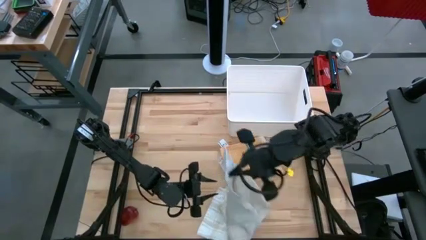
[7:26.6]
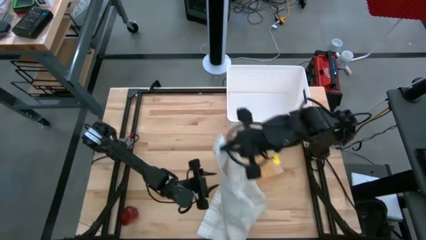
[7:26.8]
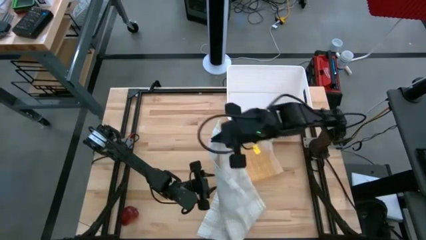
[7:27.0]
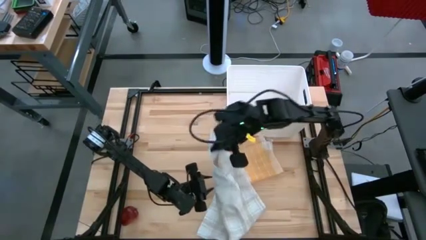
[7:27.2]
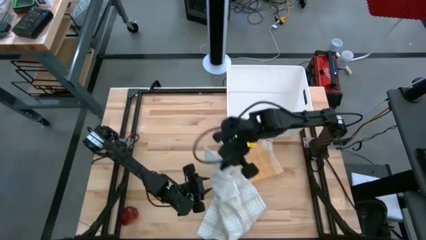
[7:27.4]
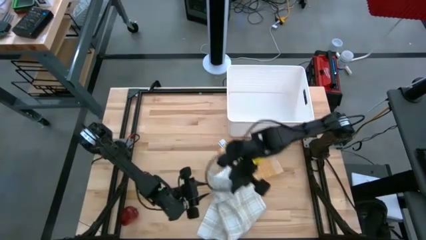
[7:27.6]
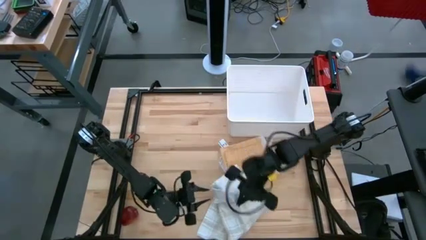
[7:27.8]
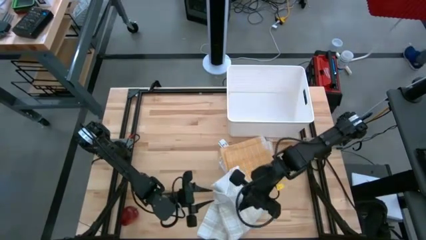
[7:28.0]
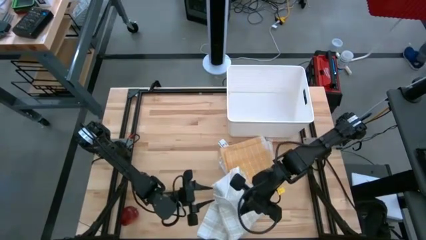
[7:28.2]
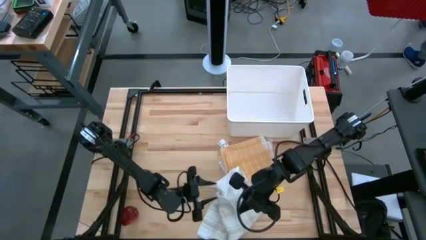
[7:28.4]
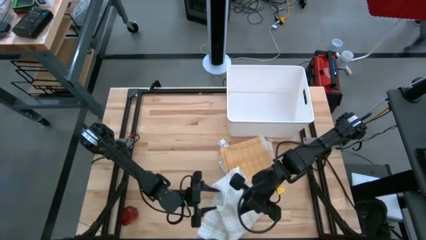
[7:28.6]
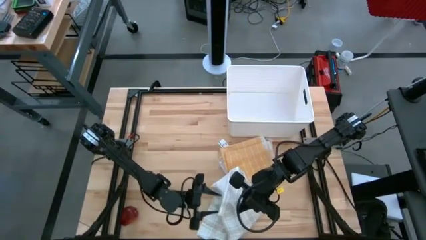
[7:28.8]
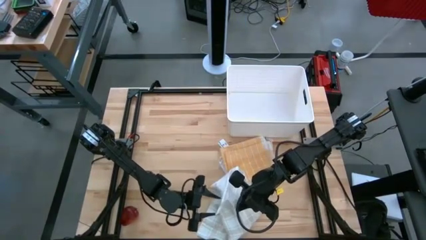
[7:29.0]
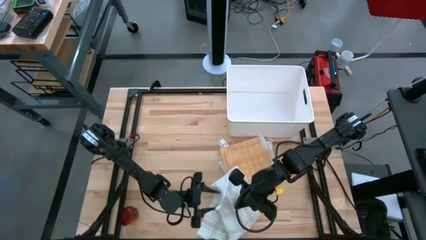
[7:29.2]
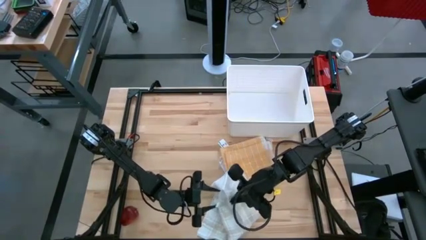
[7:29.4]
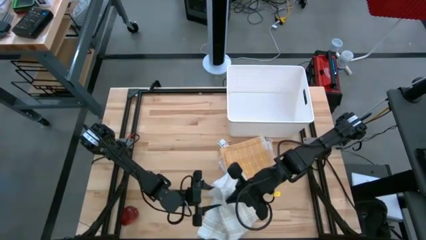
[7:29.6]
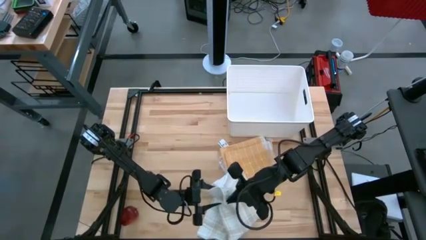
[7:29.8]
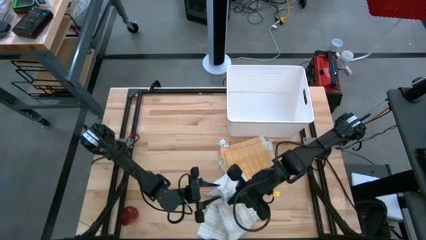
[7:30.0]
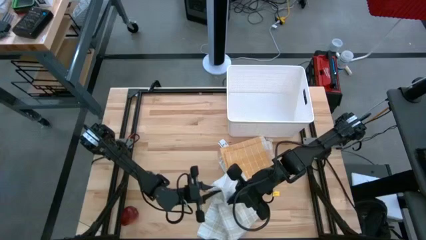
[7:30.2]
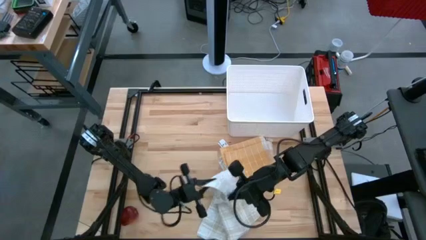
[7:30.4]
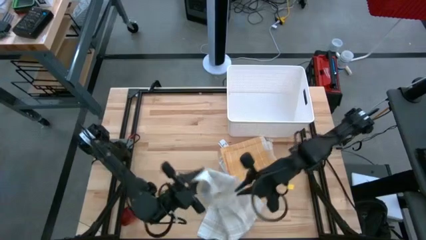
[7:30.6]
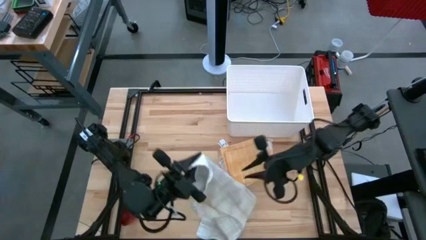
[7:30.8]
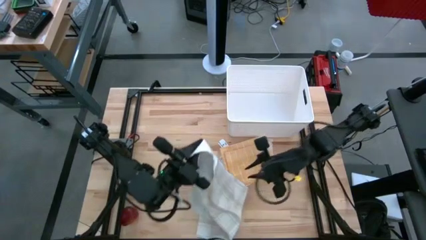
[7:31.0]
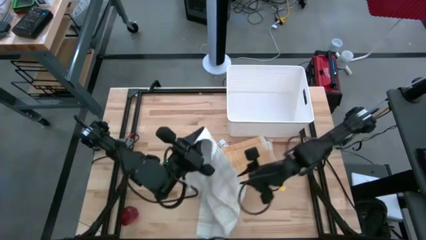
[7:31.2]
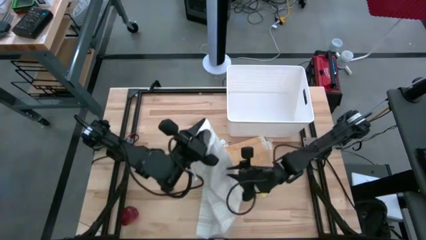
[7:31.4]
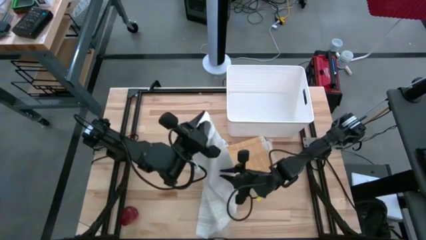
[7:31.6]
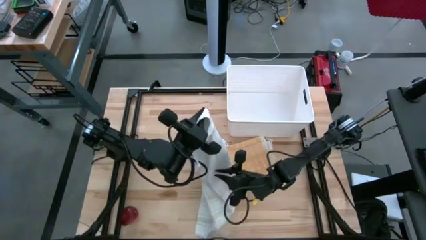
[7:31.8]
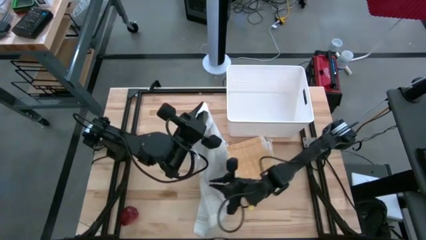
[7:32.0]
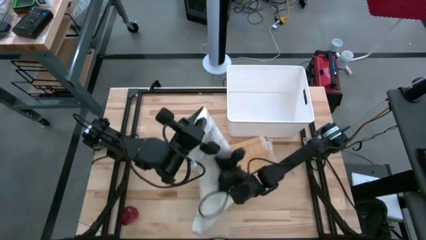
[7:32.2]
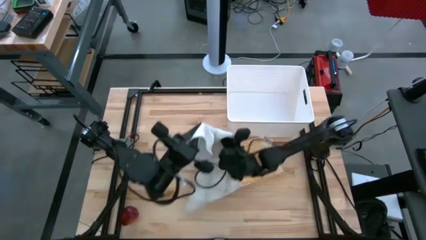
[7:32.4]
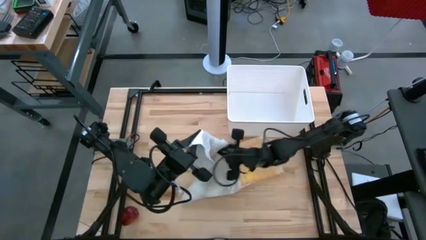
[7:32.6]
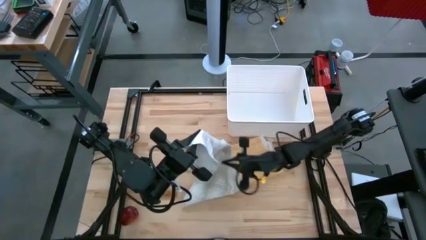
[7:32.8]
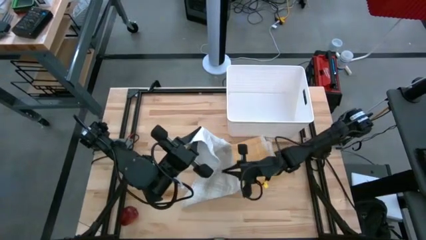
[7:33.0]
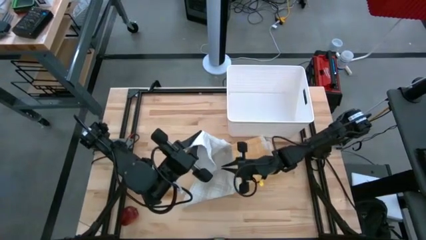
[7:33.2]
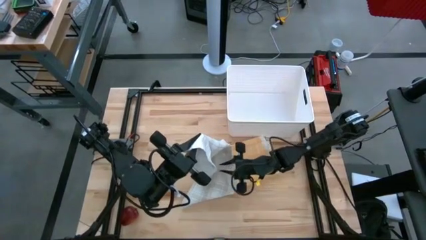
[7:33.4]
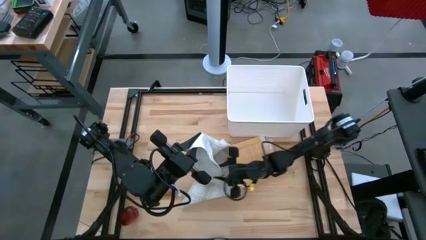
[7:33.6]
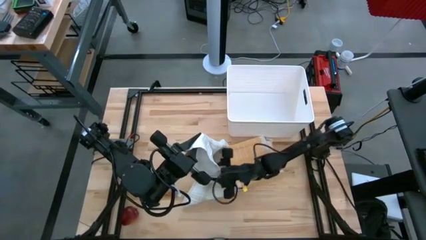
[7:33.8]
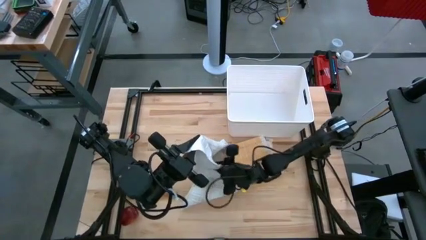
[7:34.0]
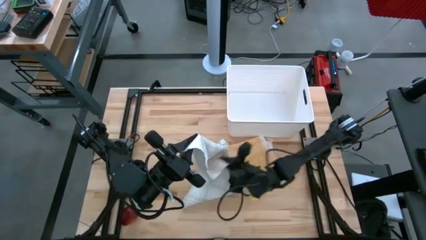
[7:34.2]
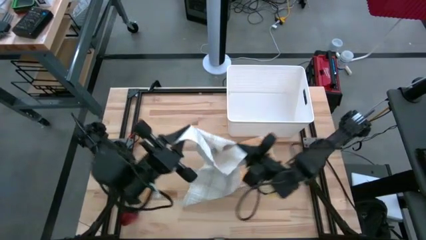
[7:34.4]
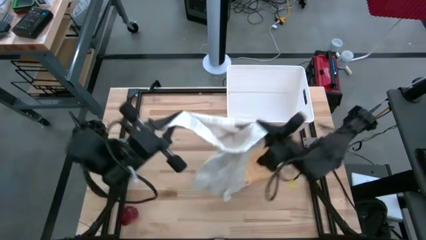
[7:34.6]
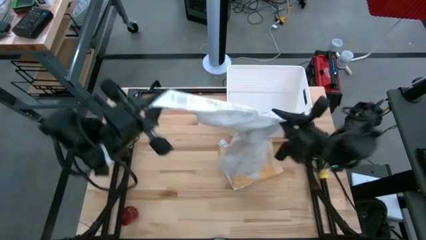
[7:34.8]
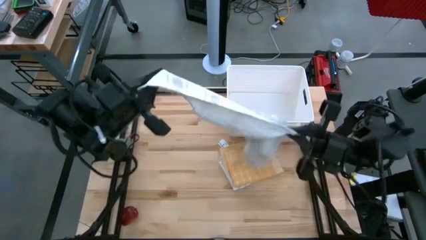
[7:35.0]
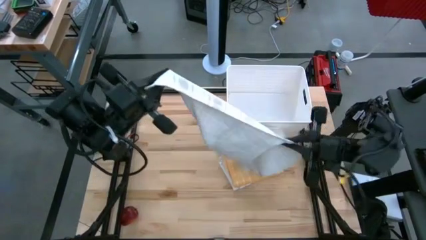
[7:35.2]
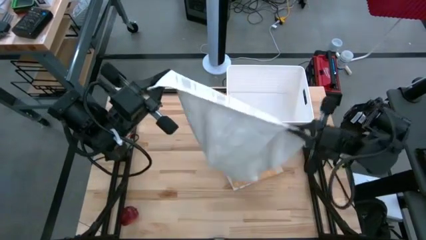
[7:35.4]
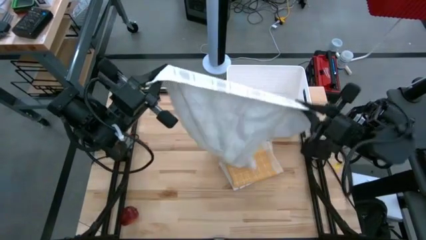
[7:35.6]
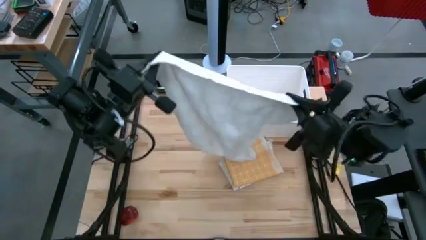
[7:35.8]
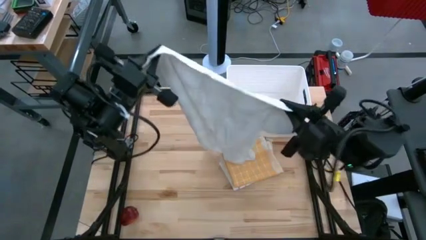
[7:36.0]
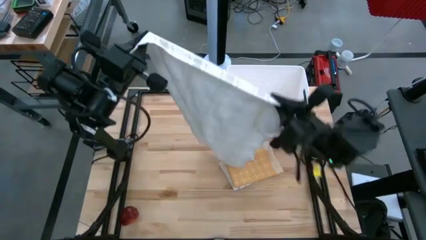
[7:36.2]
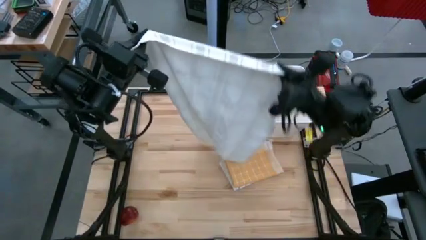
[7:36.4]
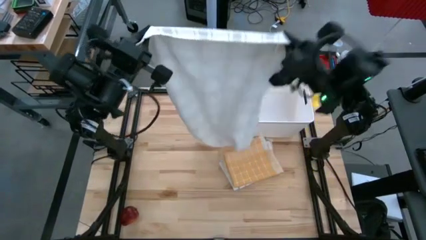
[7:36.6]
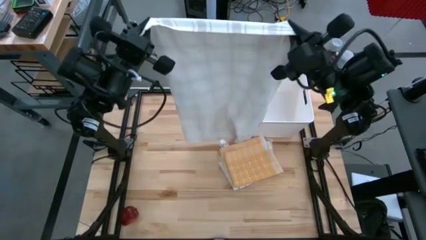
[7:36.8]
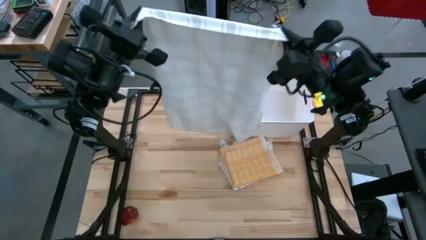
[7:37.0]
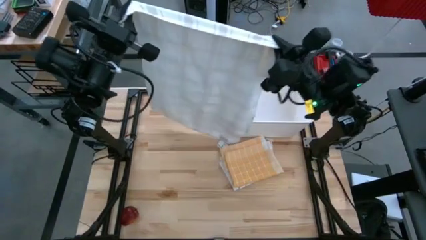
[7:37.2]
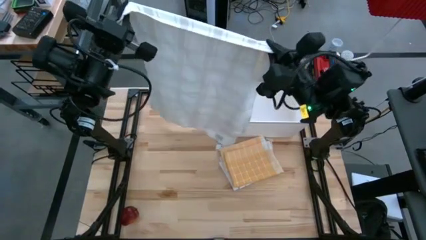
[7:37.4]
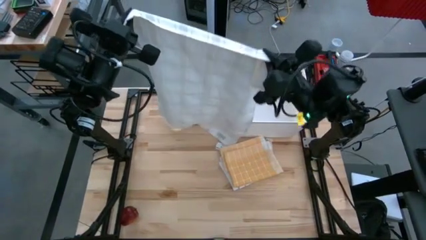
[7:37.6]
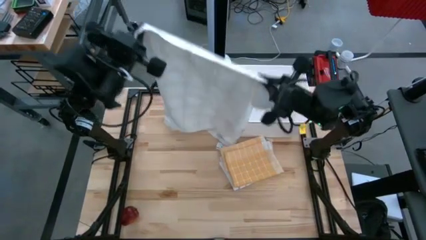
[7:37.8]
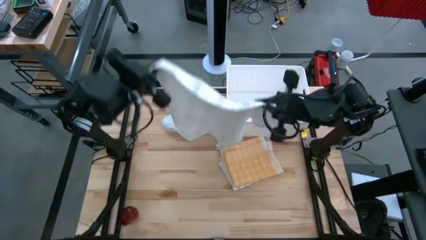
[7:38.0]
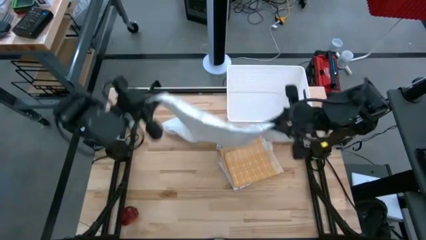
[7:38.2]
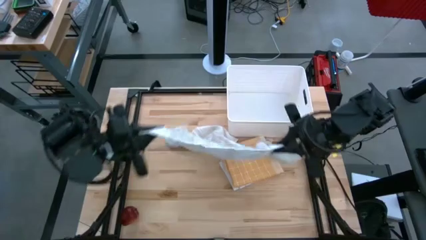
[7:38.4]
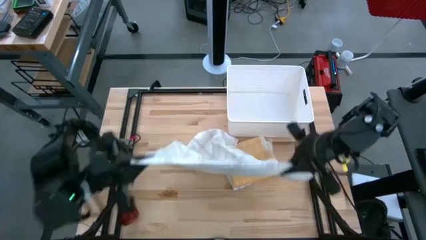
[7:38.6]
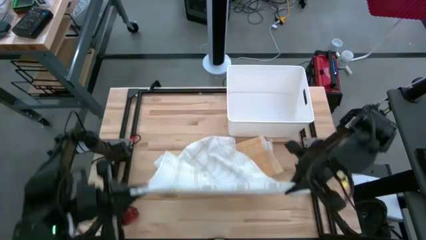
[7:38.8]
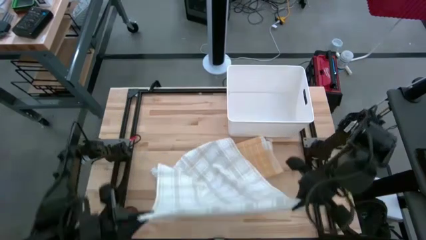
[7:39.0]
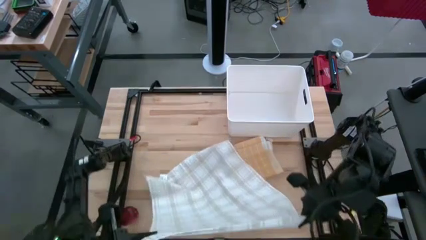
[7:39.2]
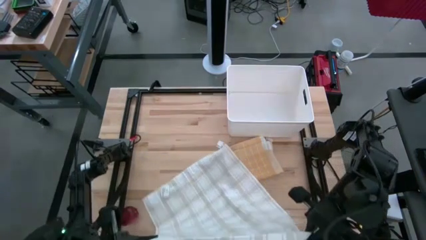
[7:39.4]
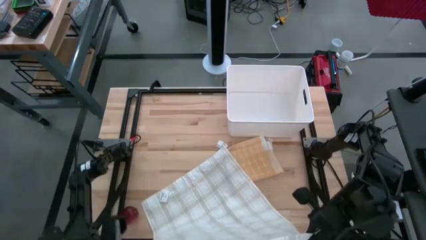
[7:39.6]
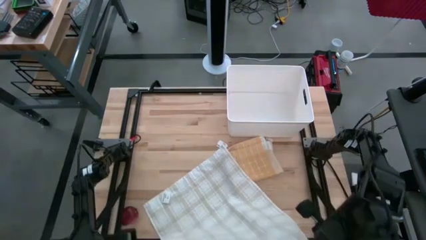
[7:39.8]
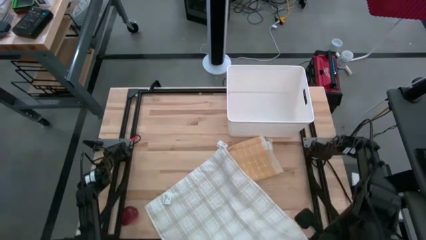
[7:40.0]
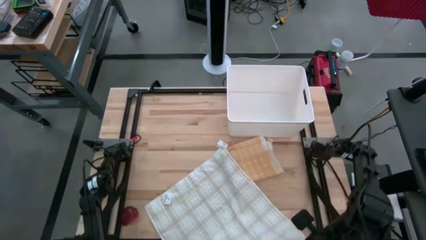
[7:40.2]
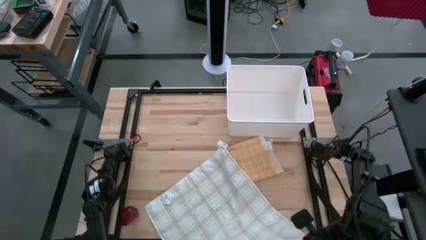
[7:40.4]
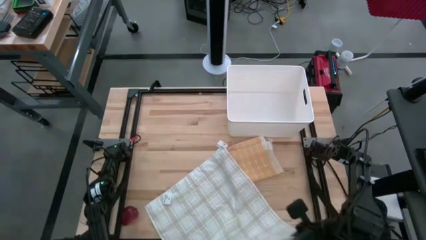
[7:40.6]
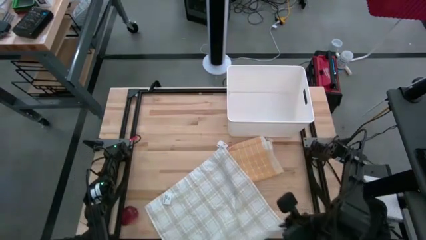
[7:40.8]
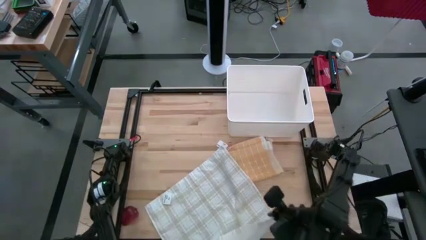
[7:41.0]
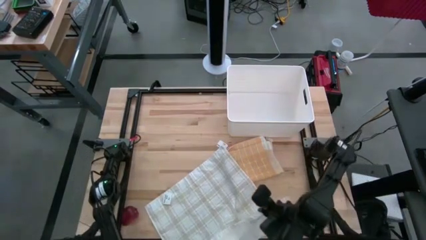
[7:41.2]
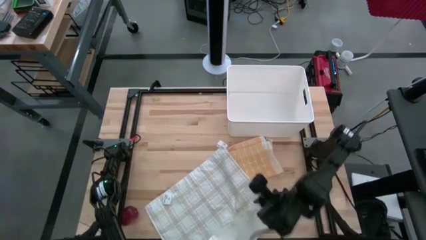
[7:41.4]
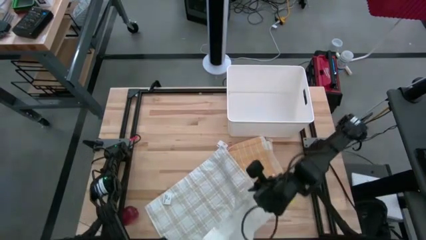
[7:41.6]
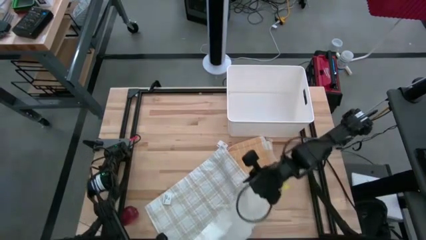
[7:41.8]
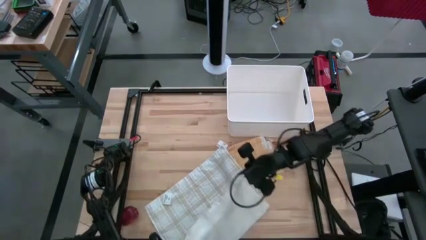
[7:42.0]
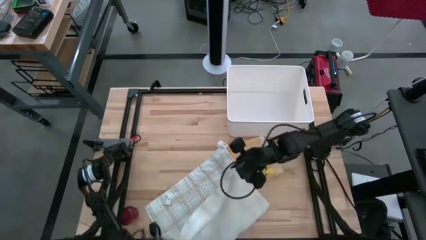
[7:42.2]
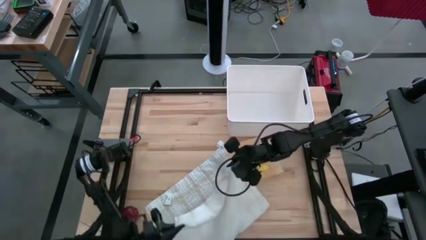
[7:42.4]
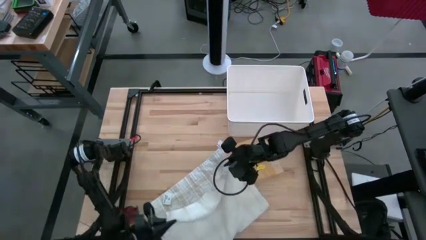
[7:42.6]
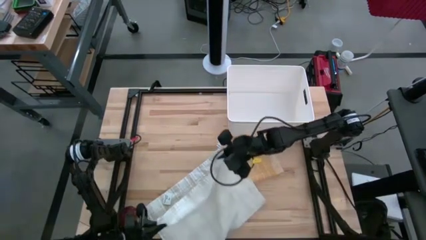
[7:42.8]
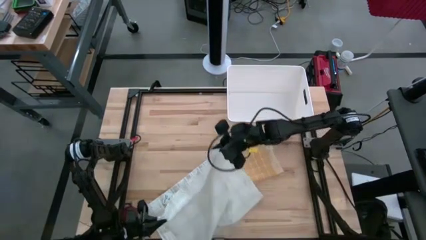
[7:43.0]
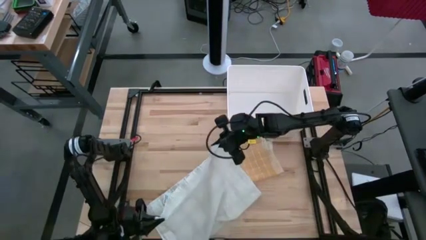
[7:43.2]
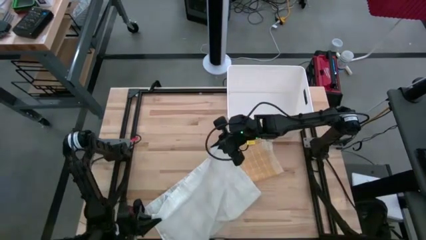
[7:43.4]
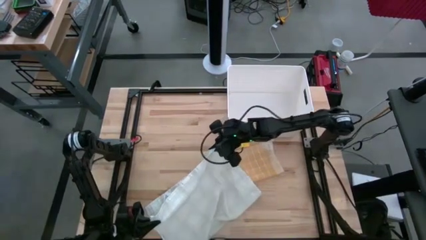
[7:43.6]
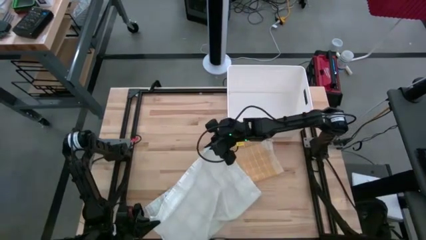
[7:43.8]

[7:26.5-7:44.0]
Task: Fold towel
Fold the white checkered towel
